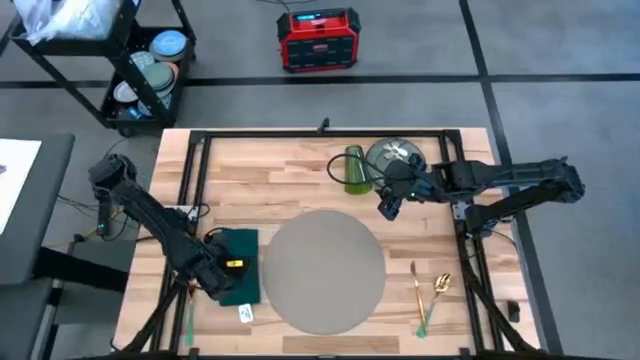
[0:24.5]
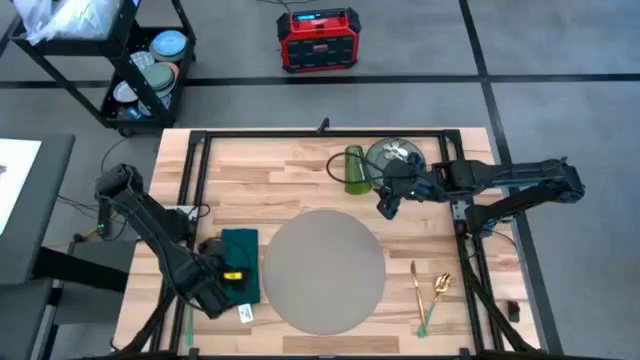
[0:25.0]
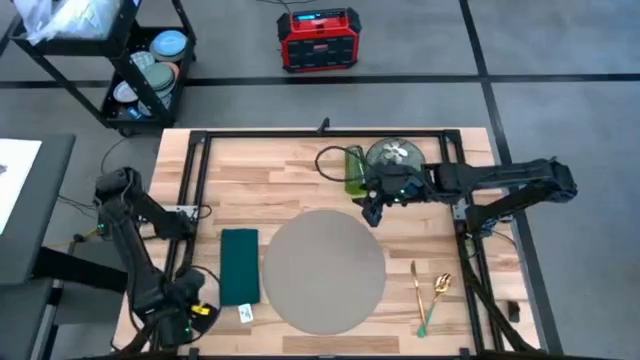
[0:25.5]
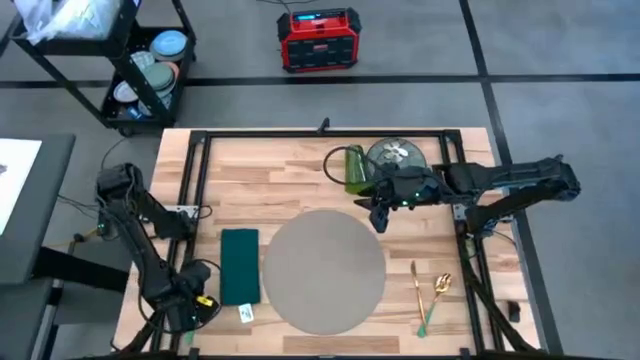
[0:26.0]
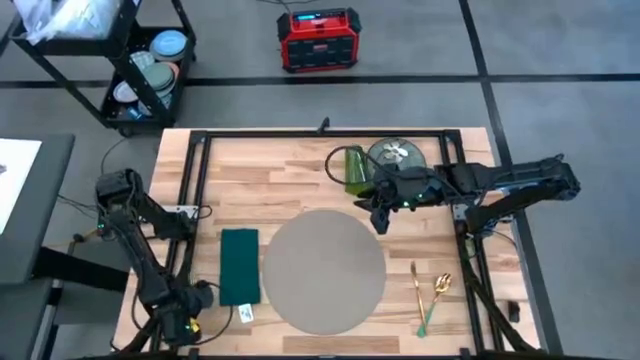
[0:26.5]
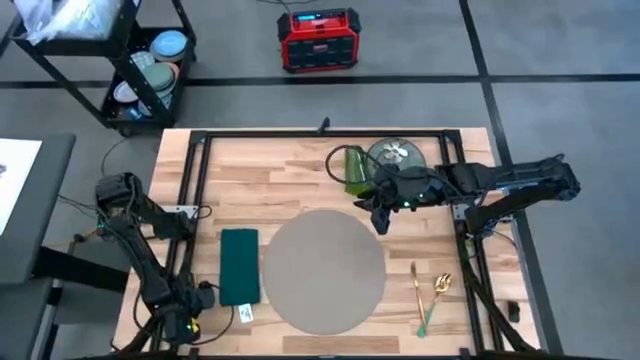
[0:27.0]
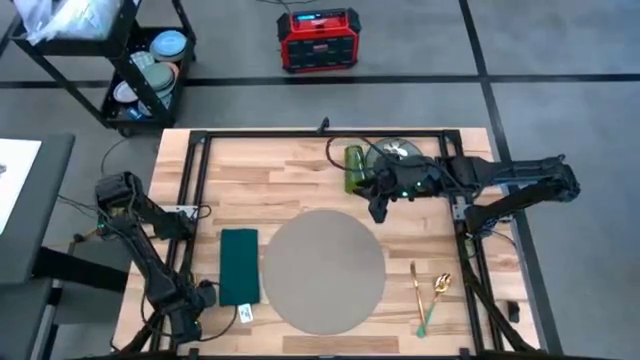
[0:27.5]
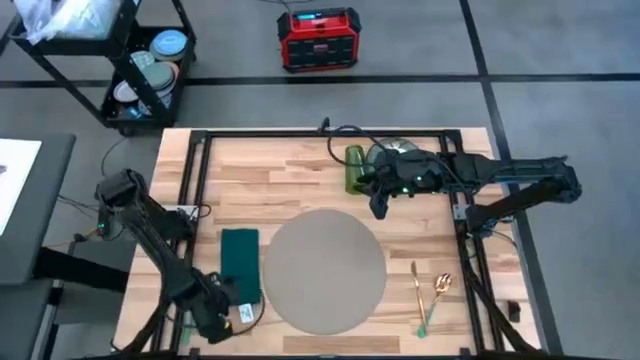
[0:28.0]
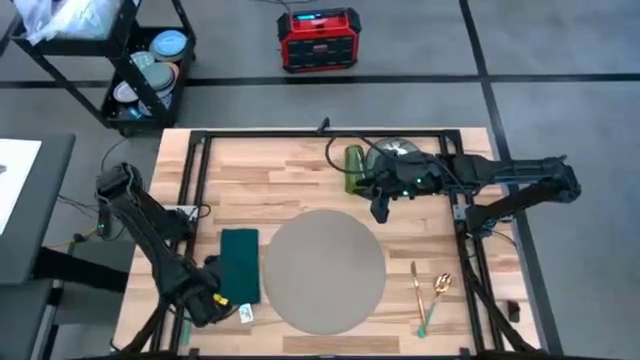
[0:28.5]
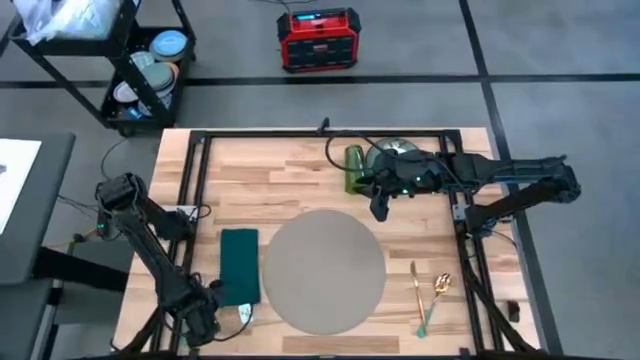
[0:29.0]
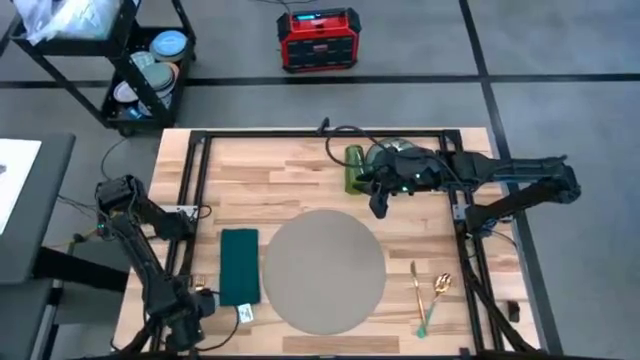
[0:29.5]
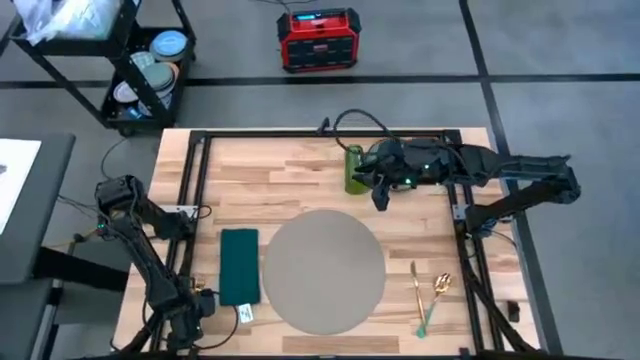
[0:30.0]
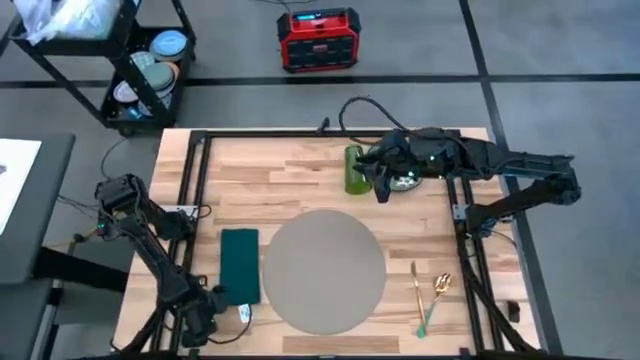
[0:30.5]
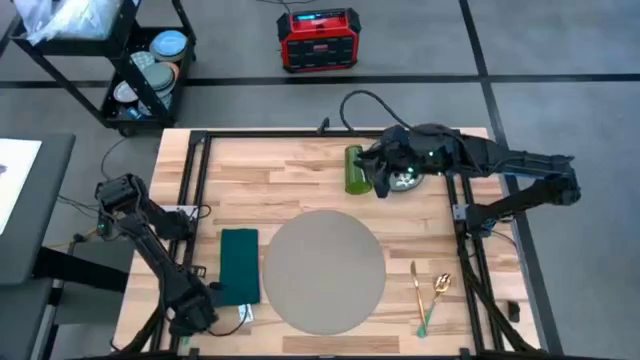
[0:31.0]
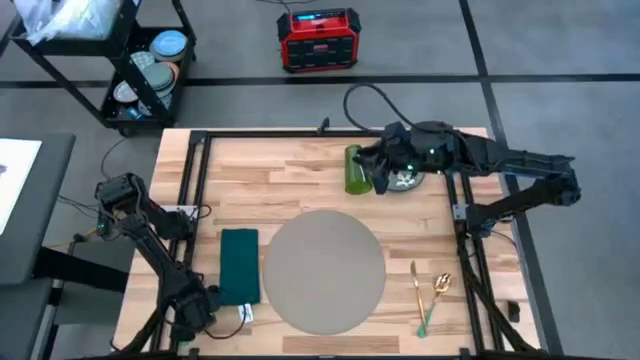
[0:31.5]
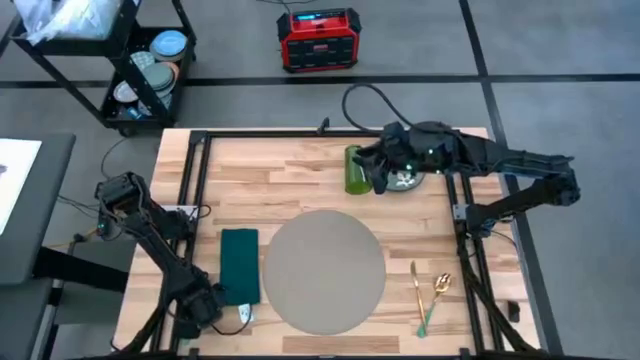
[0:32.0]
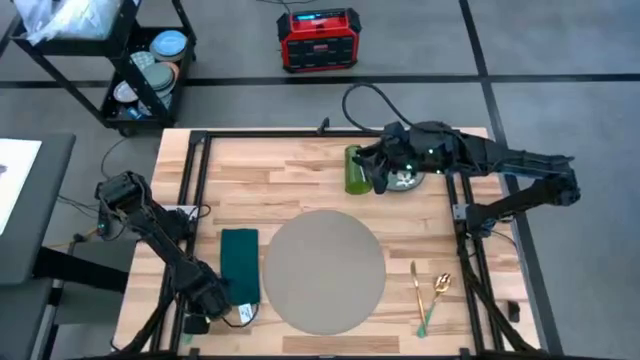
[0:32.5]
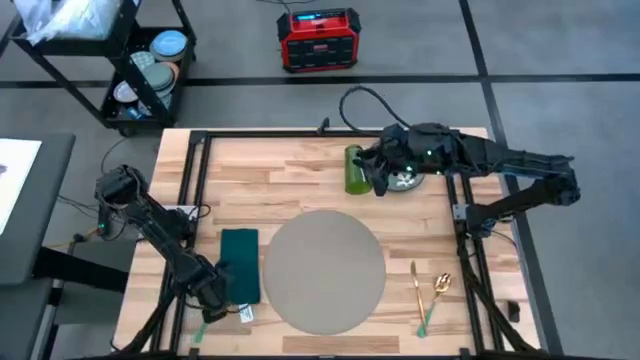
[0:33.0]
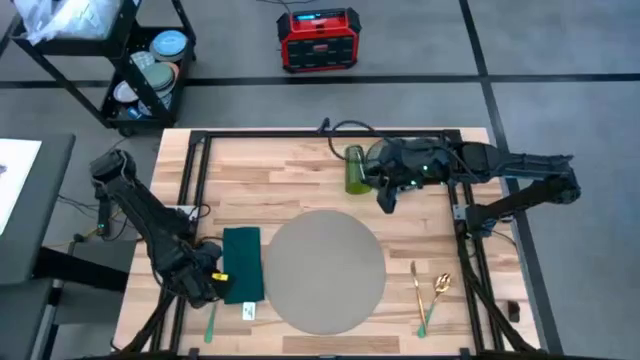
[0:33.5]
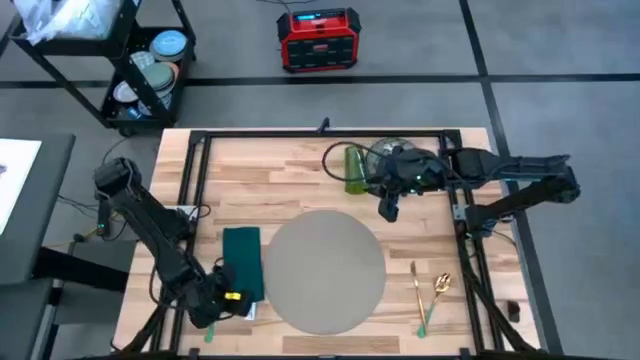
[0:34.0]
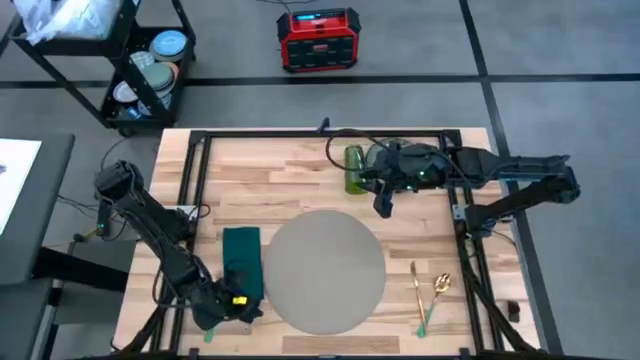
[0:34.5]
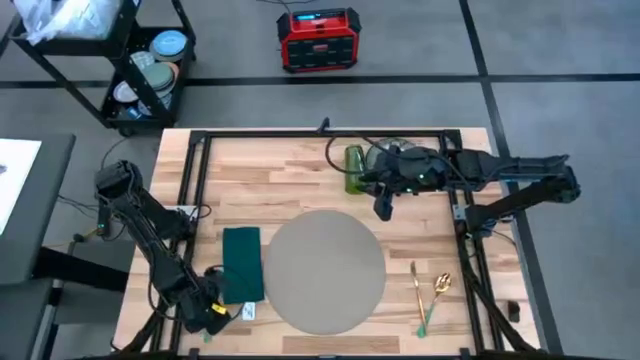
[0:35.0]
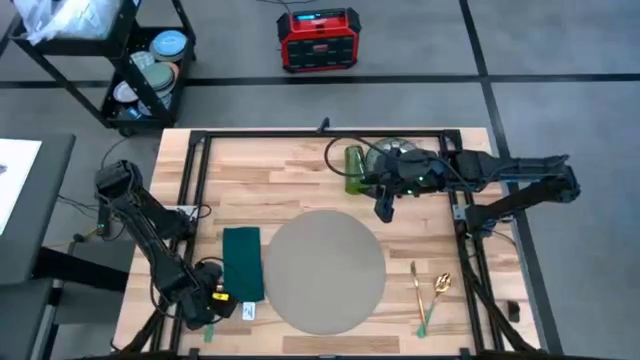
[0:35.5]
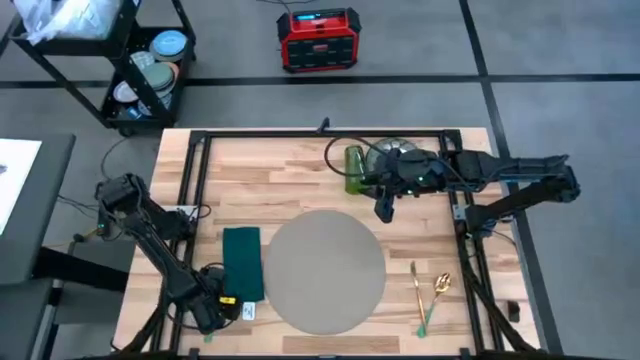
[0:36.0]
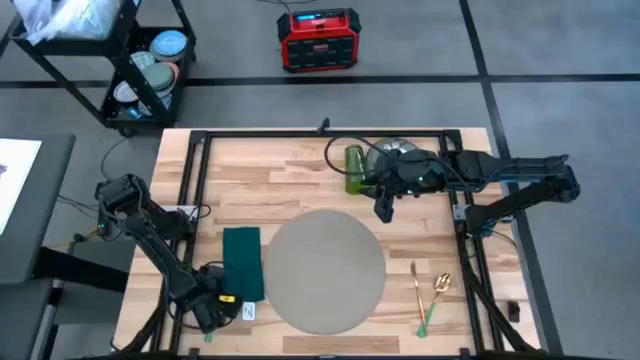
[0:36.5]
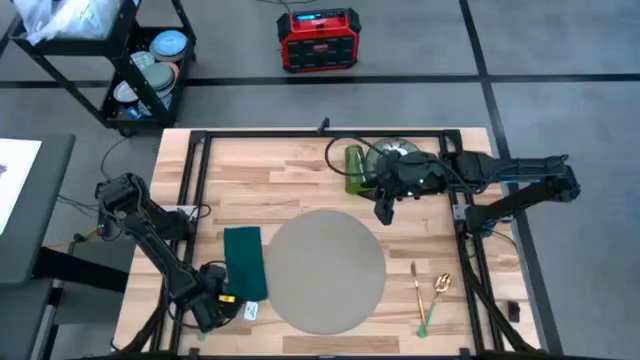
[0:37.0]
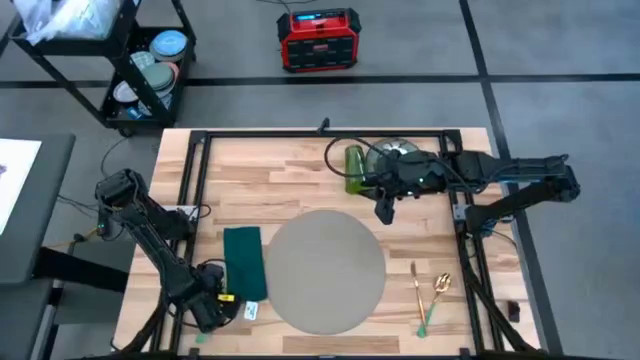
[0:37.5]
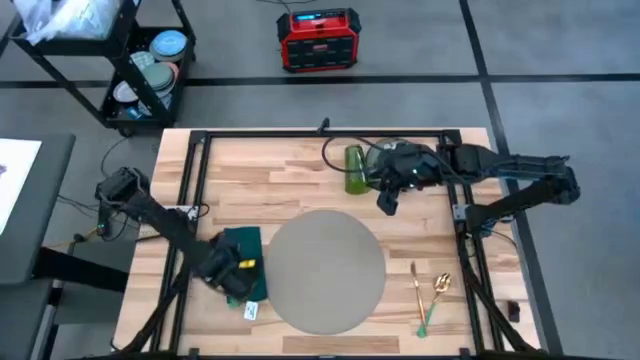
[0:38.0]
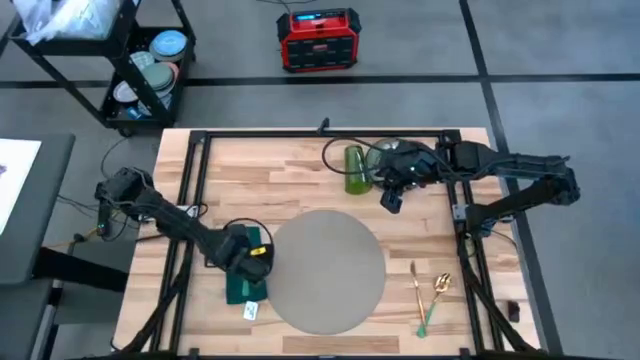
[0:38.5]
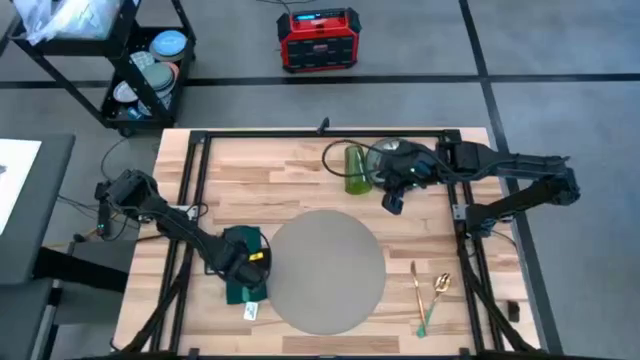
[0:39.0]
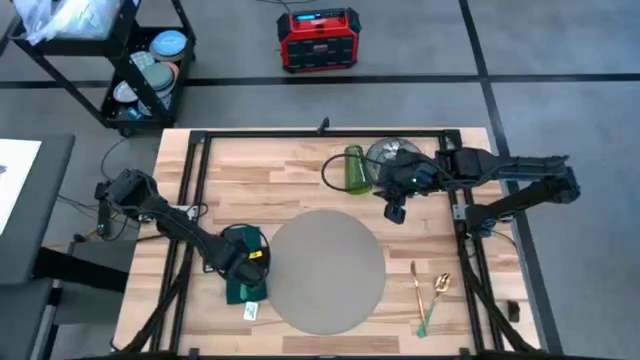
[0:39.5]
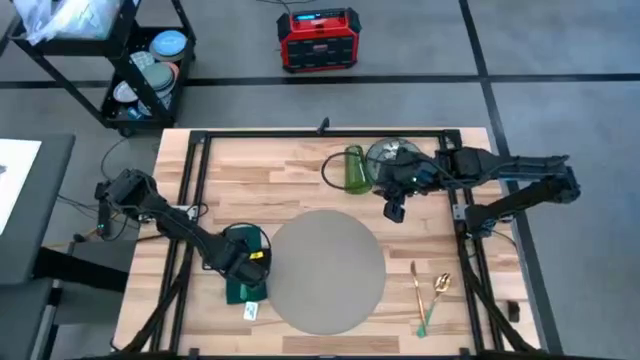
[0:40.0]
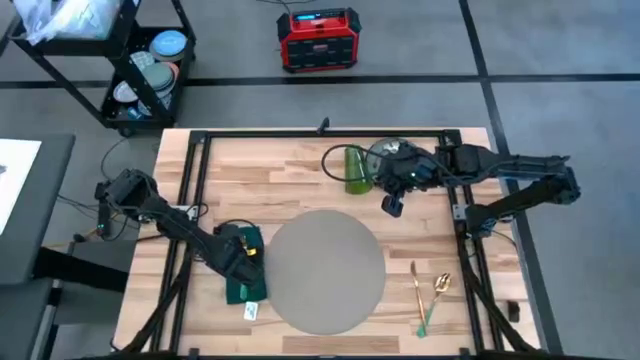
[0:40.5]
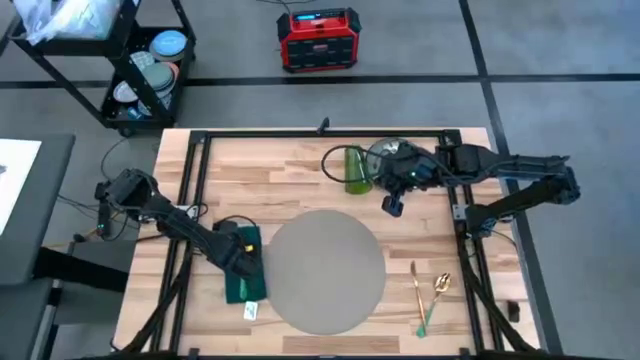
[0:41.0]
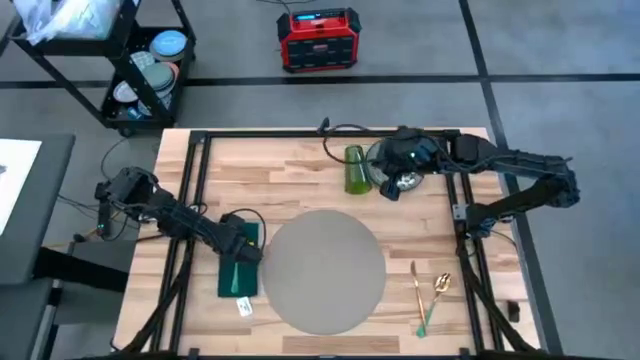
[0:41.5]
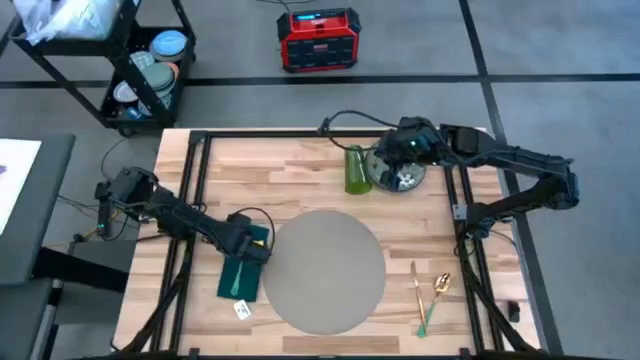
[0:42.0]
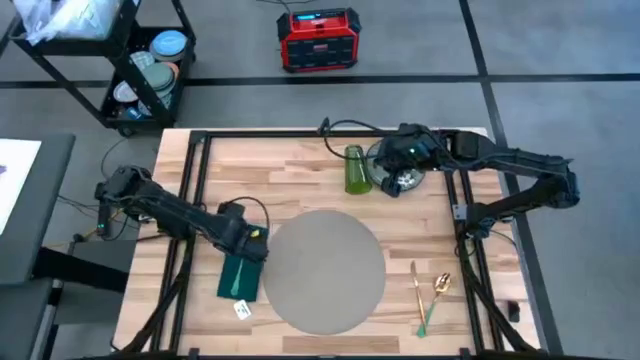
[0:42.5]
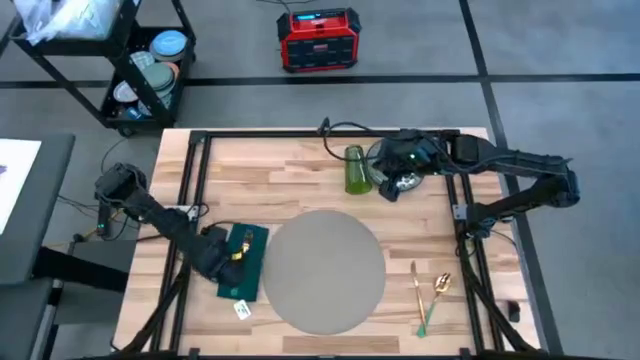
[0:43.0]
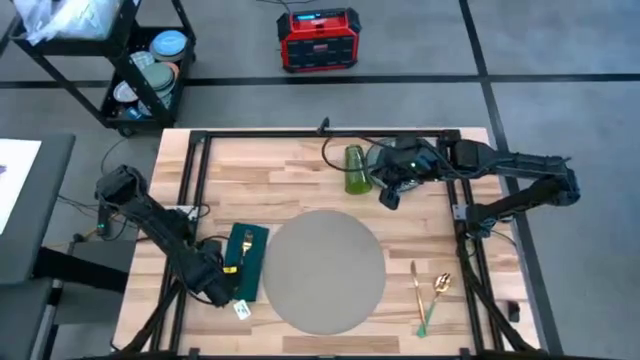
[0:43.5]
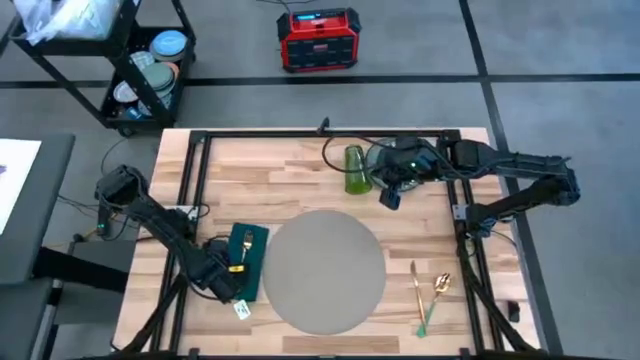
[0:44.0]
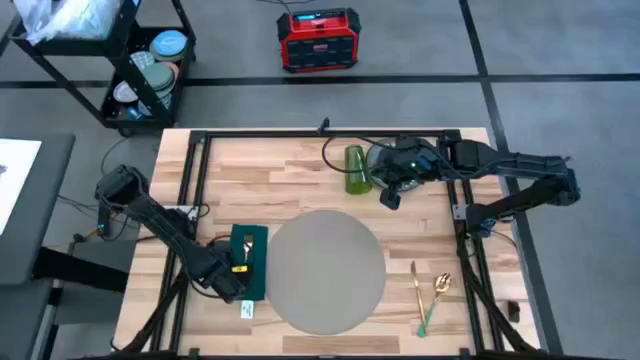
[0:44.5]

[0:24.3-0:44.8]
Task: Set table place
Put the green fork on the green table napkin

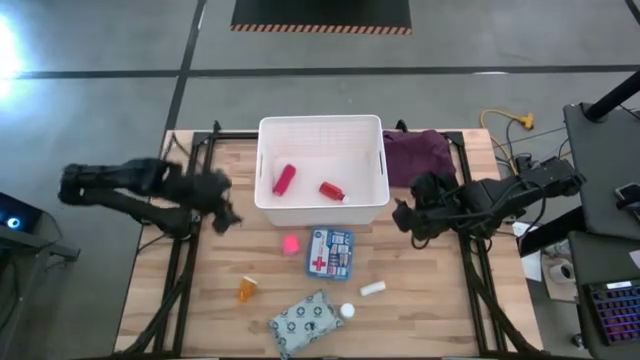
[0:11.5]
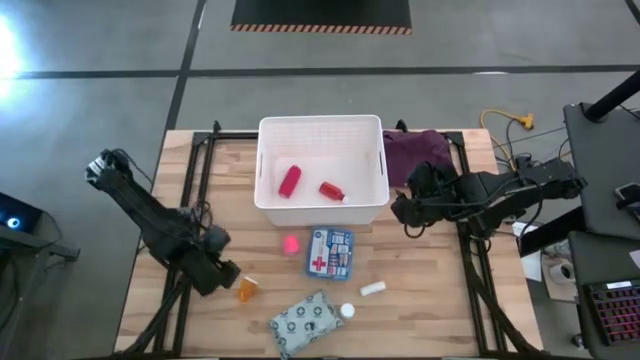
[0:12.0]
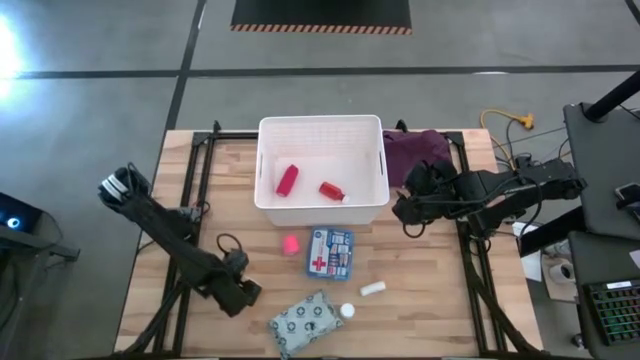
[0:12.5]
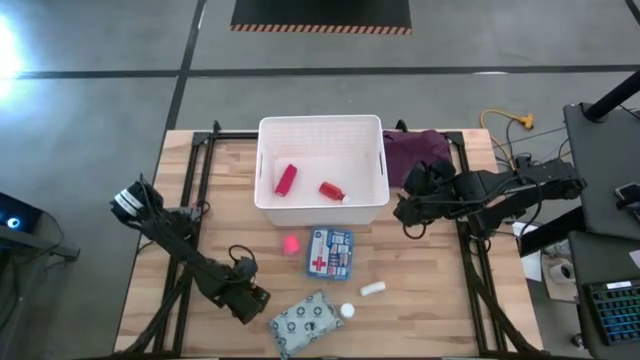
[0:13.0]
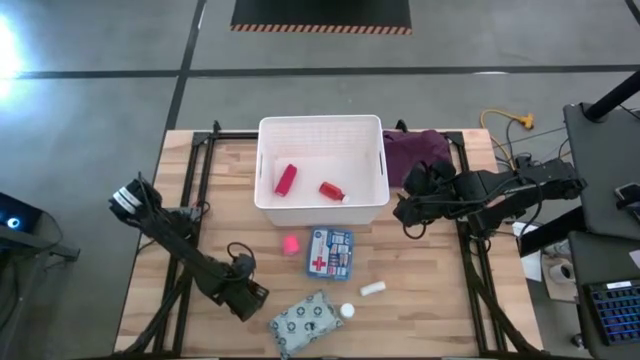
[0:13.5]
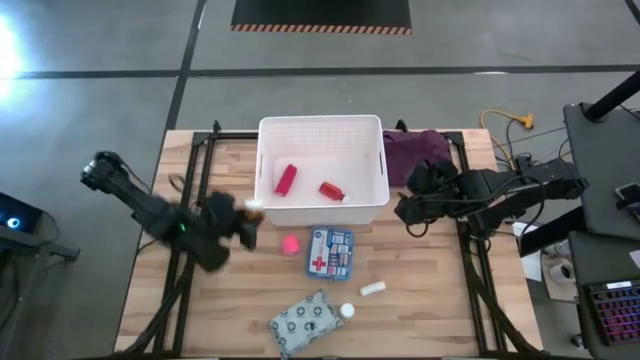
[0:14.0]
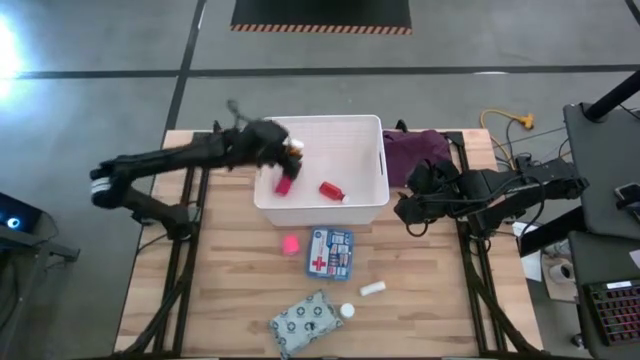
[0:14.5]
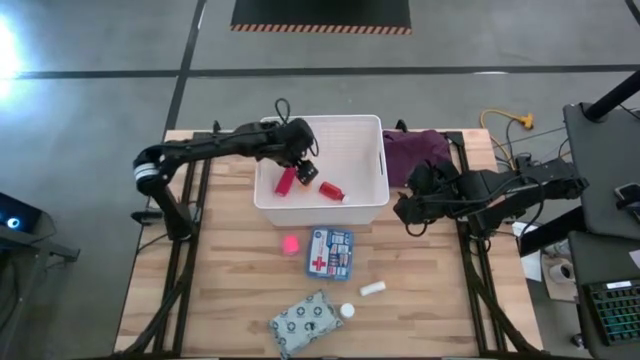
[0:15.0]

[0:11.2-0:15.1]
Task: Pick & place medical supplies in basket/bin
Put the orange pill bottle into the white bin
